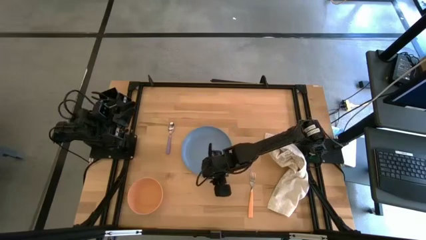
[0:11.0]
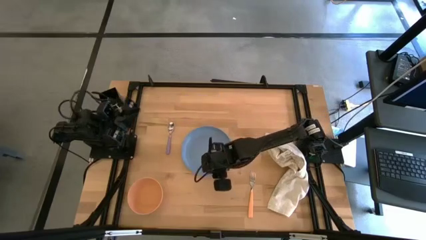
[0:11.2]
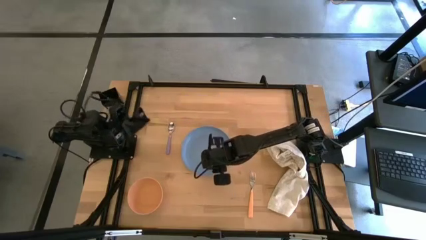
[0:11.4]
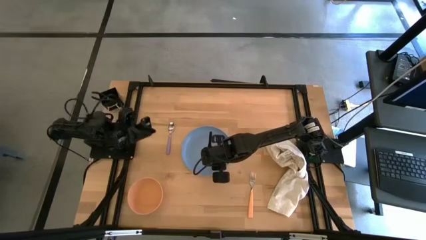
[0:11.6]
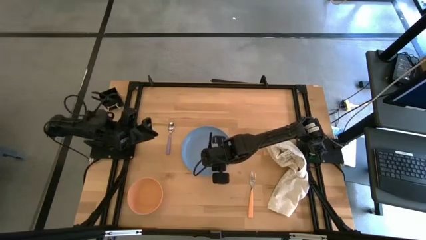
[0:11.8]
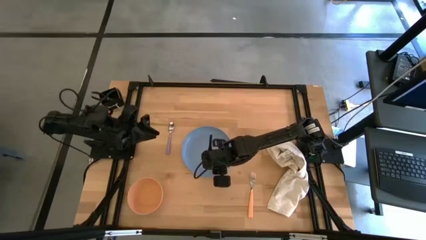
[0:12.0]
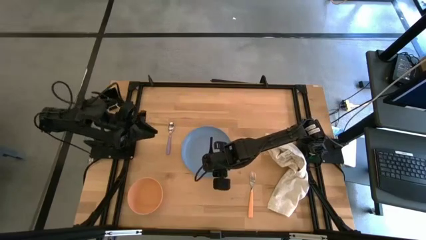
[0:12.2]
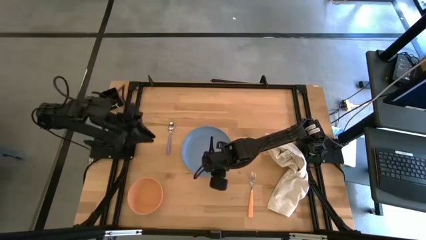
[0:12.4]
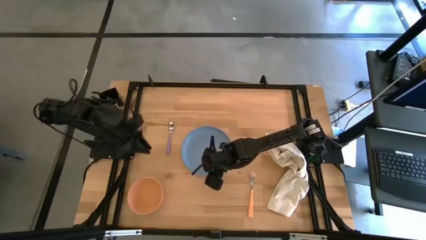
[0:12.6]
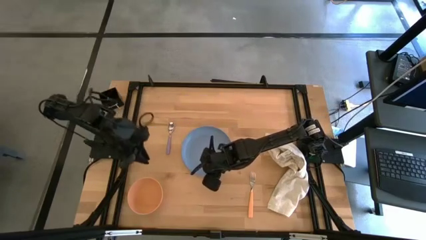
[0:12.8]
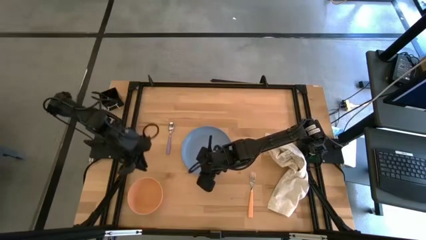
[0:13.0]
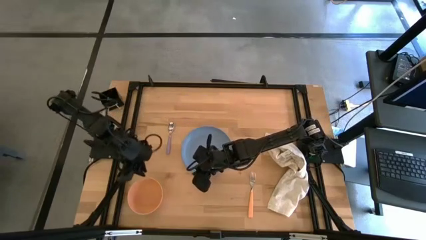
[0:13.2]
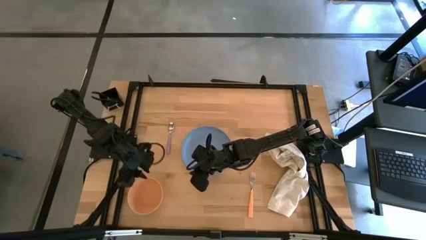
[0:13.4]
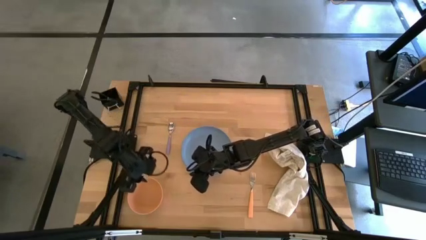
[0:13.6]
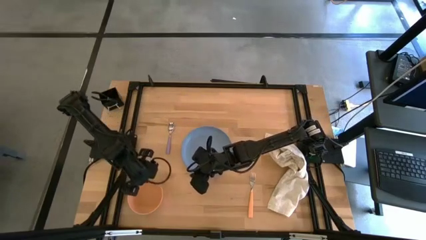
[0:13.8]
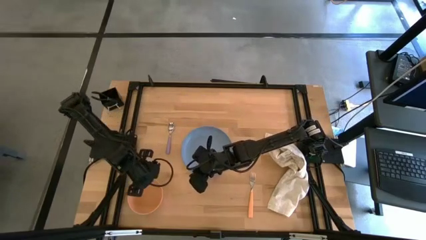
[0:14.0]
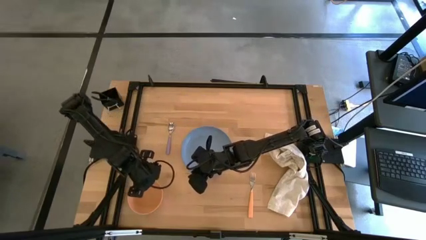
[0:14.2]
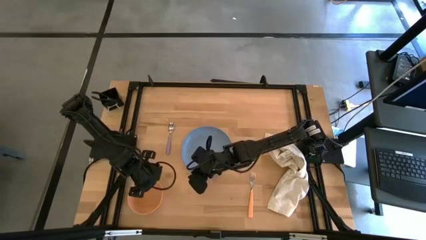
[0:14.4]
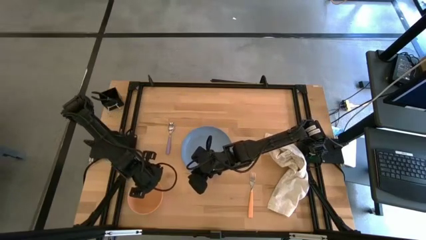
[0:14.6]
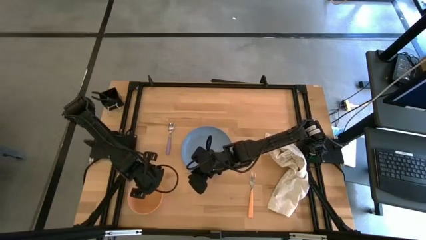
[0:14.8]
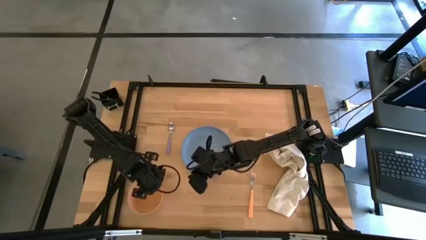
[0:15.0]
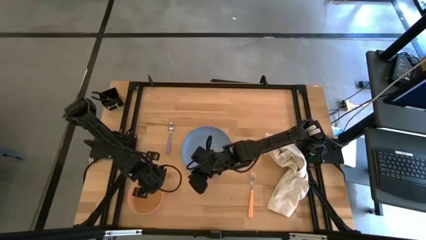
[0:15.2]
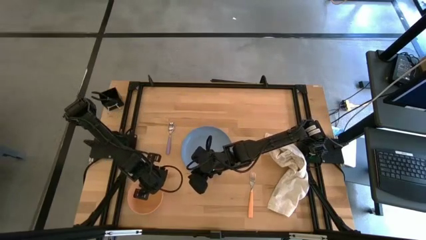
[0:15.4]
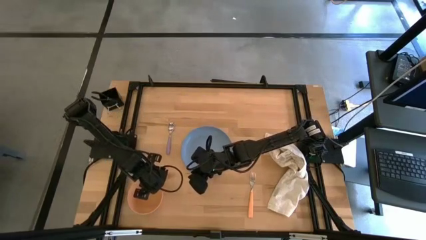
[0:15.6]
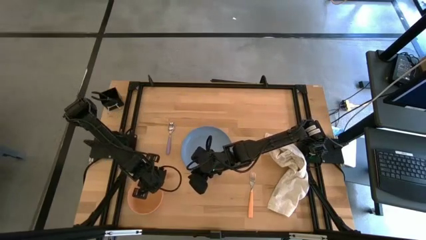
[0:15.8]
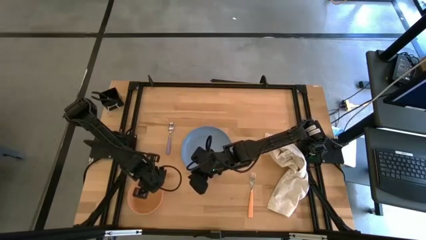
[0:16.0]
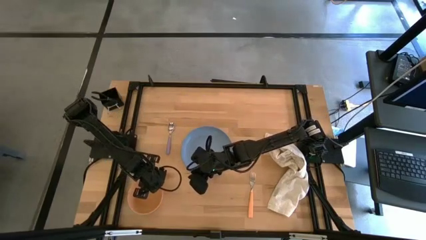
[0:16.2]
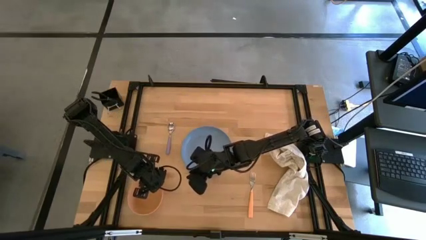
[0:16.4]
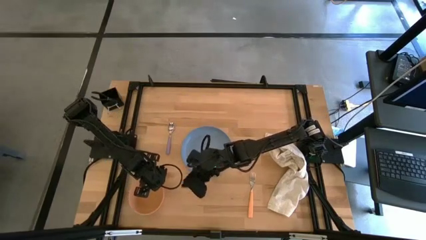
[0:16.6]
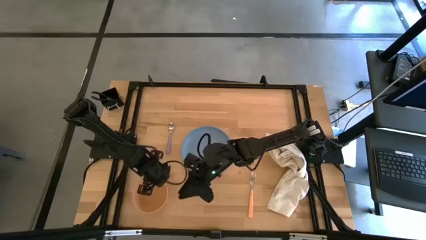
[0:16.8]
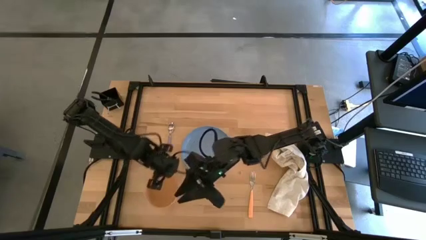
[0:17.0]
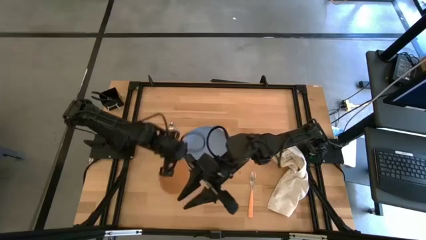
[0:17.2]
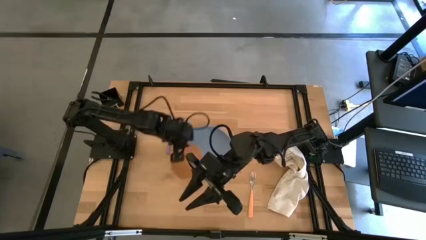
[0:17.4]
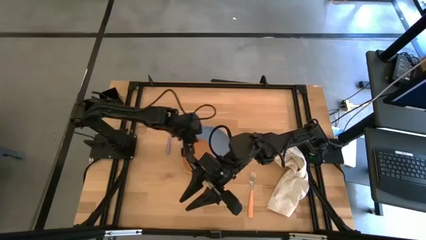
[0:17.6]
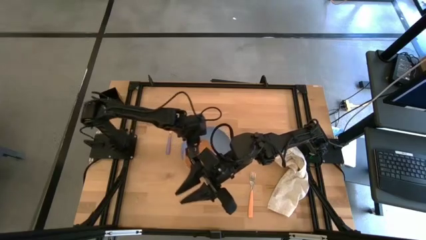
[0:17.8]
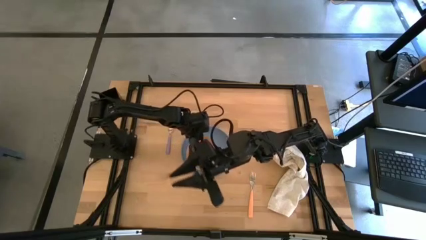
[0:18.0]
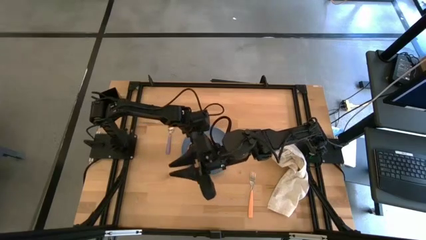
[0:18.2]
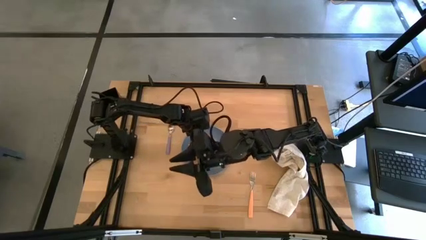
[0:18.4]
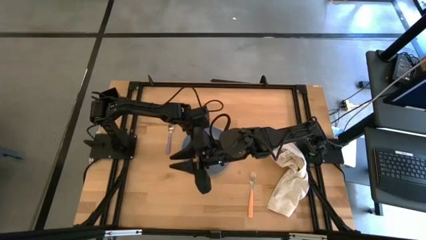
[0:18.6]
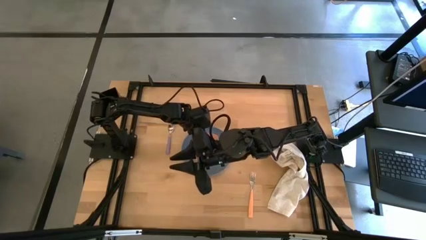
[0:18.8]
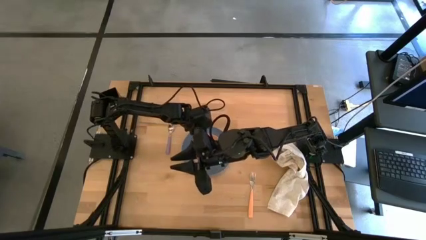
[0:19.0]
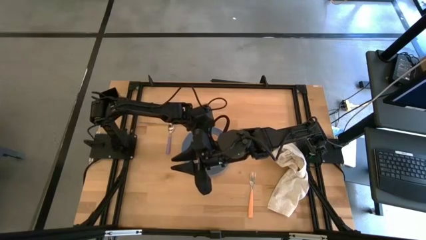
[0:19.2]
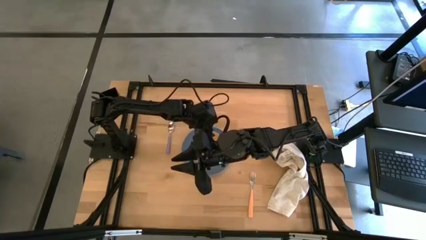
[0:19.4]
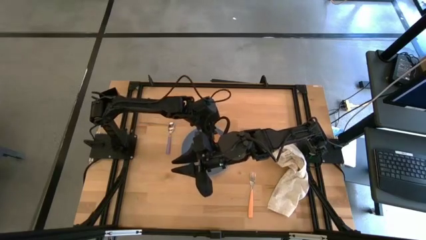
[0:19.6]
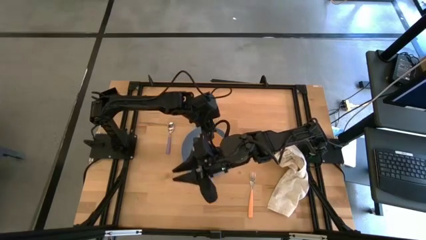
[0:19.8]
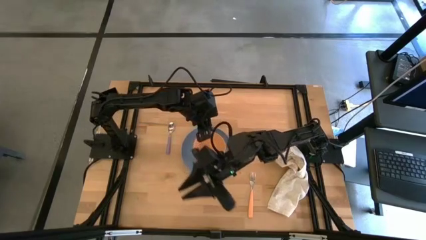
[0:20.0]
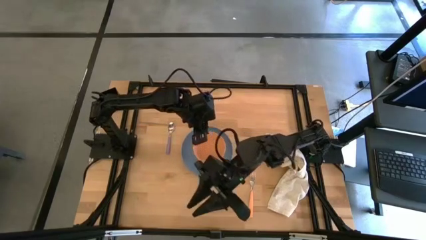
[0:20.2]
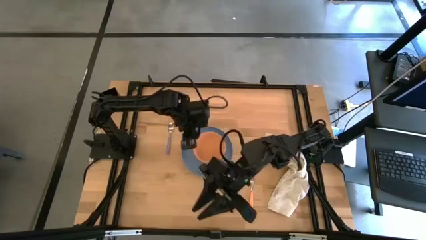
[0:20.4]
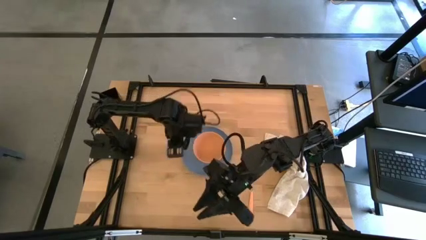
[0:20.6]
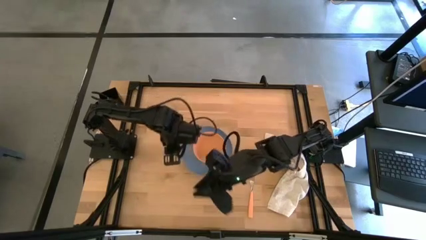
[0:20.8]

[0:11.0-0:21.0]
Task: Set table place
Stack the orange bowl on the blue plate
